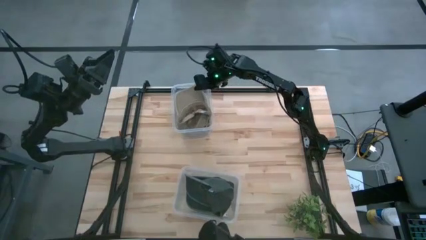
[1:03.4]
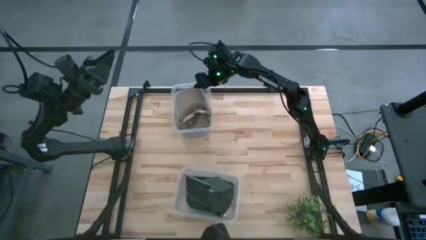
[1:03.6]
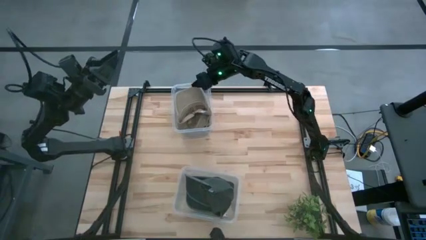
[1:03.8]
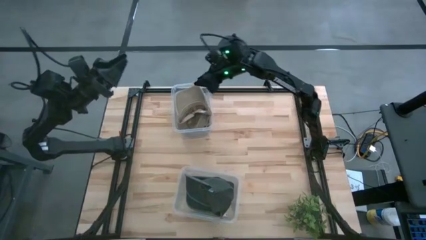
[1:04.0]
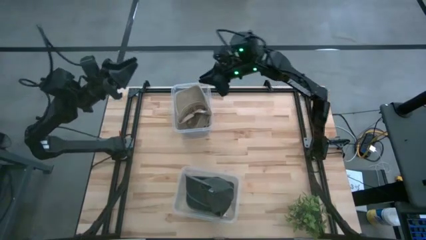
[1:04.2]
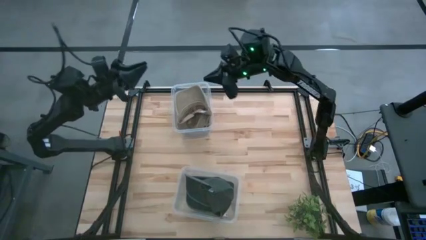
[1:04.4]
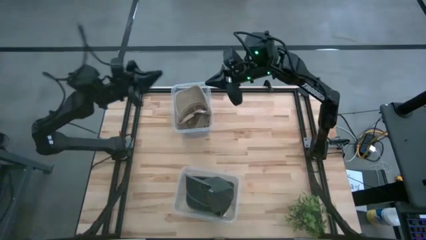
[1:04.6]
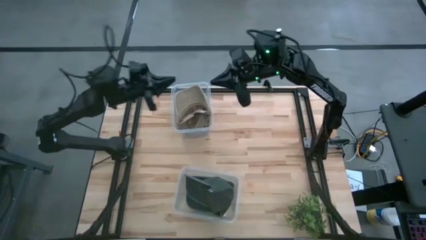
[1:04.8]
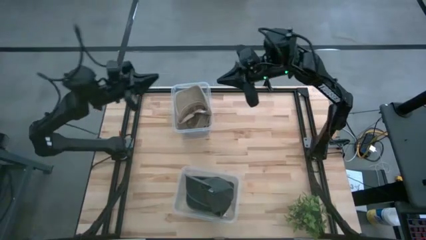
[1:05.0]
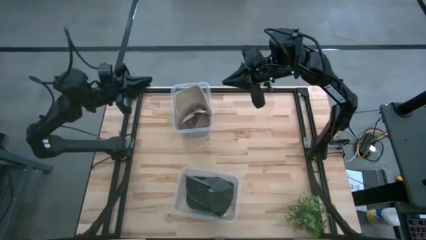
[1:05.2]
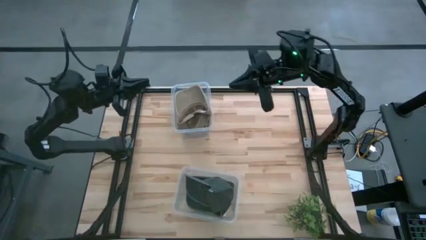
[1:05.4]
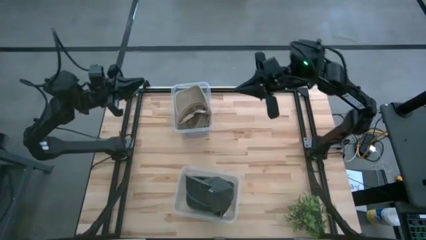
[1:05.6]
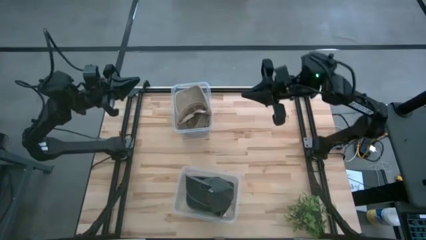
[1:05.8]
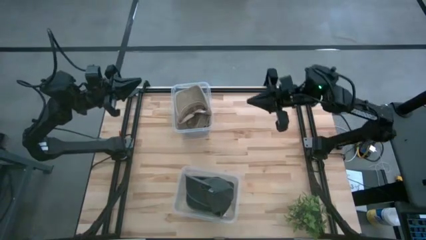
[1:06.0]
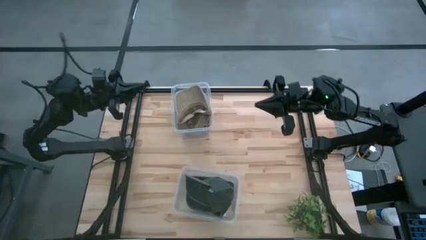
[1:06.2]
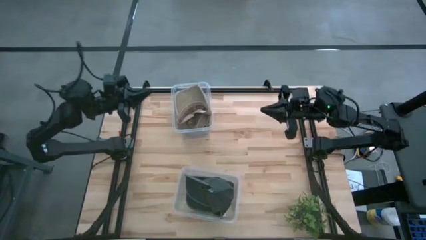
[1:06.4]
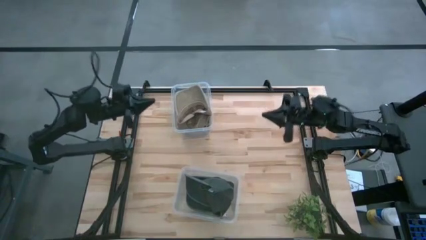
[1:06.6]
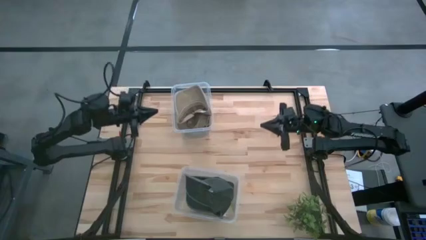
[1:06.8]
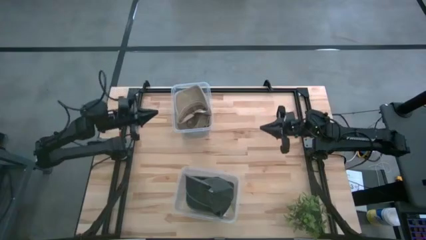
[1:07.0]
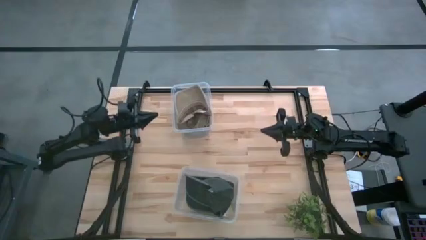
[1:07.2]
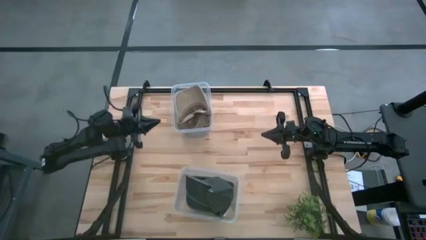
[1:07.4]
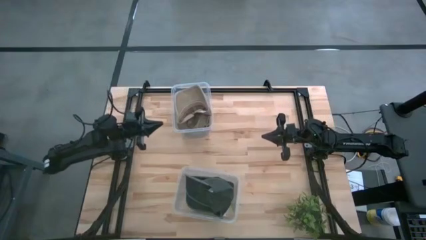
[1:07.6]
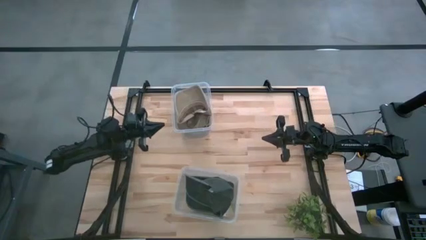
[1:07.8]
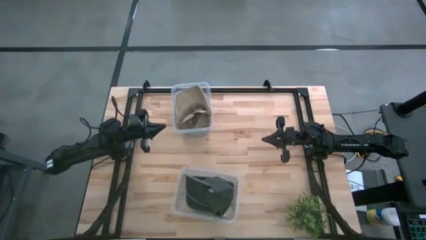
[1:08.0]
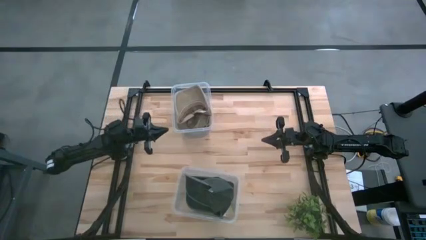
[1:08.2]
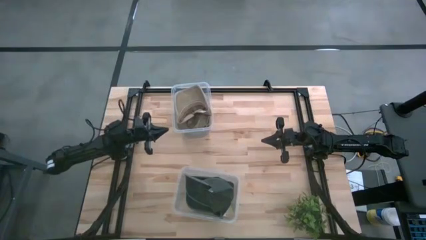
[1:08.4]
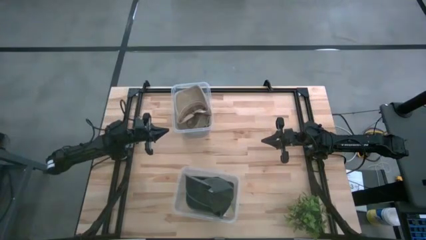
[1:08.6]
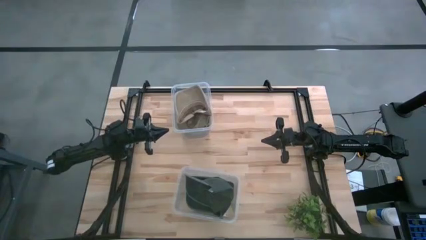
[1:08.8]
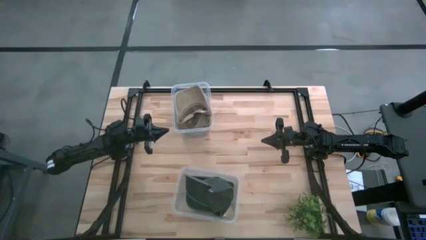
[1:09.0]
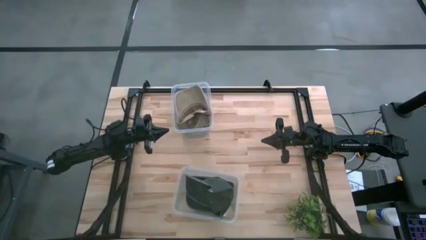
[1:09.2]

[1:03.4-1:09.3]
Task: Pick & Place hat
Return to Home Position

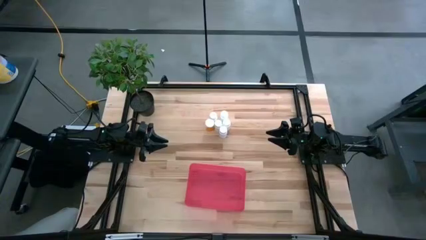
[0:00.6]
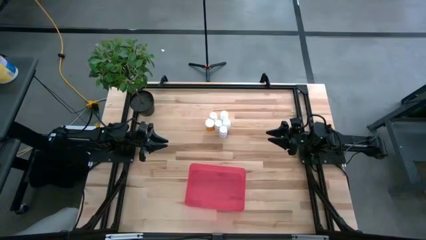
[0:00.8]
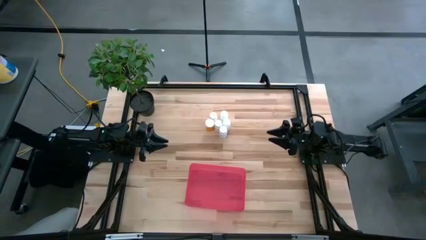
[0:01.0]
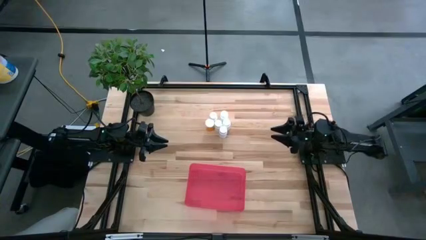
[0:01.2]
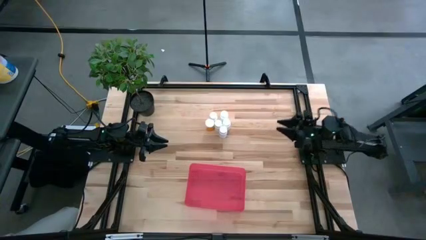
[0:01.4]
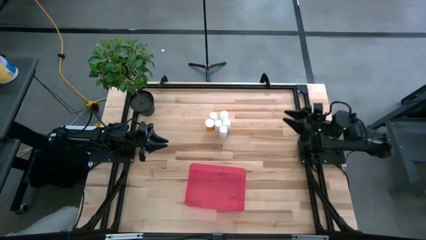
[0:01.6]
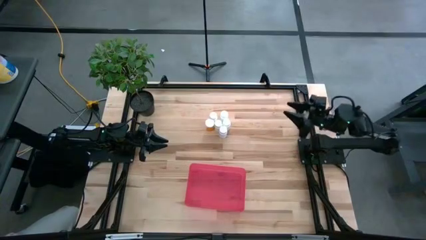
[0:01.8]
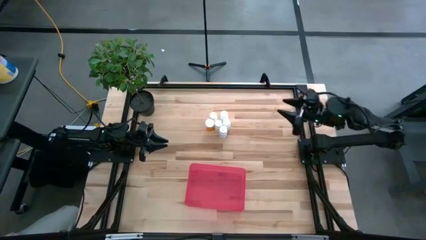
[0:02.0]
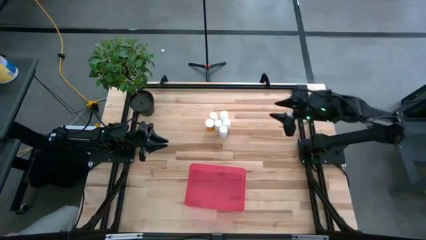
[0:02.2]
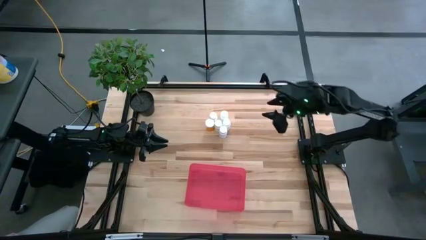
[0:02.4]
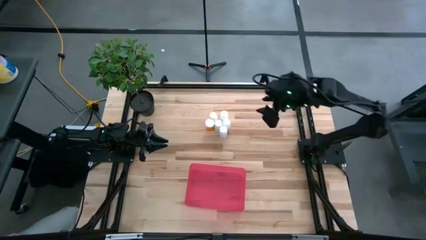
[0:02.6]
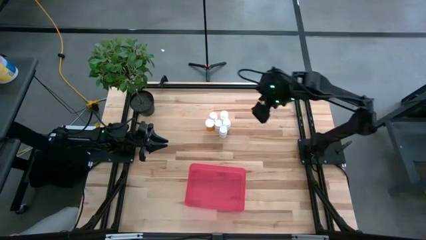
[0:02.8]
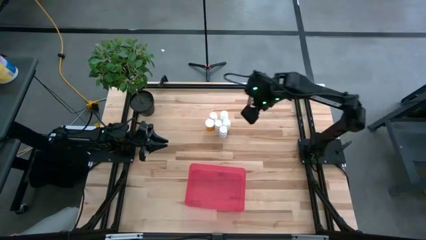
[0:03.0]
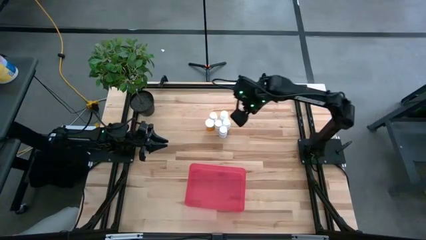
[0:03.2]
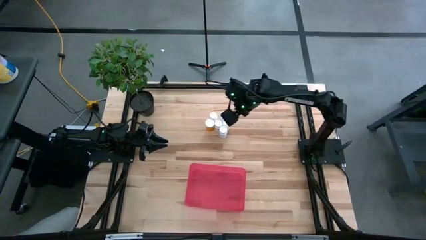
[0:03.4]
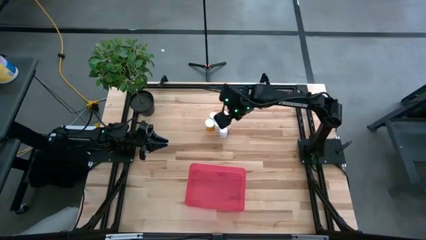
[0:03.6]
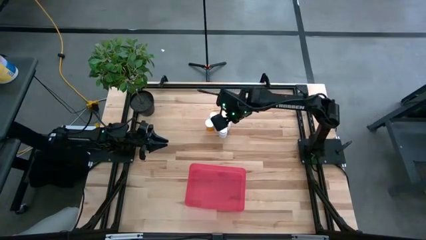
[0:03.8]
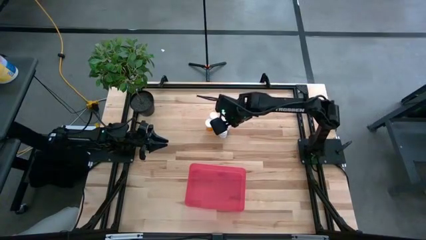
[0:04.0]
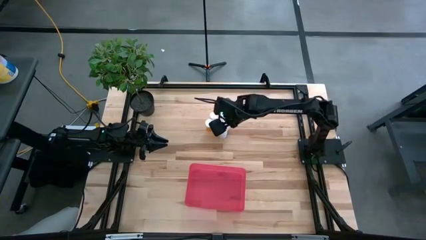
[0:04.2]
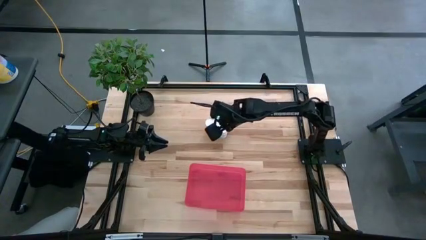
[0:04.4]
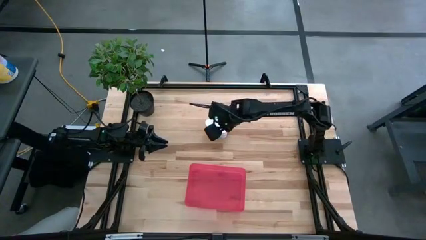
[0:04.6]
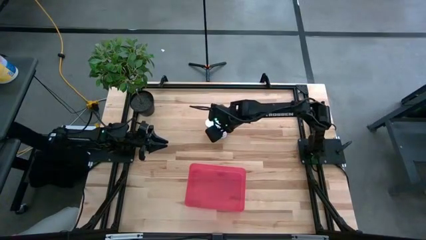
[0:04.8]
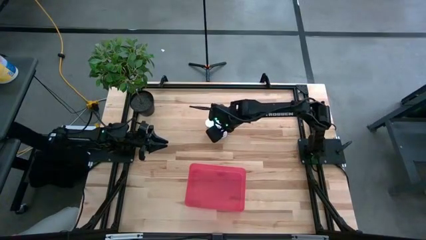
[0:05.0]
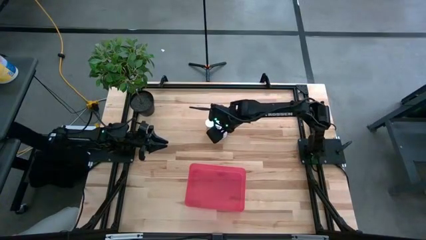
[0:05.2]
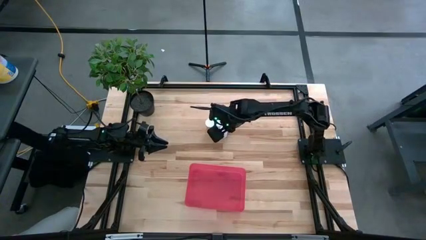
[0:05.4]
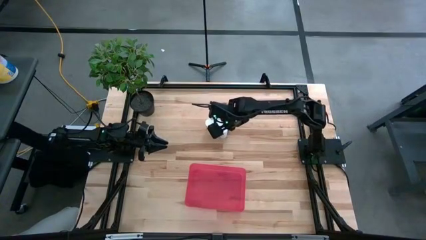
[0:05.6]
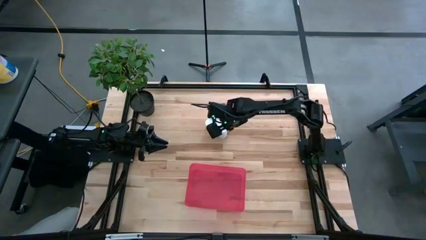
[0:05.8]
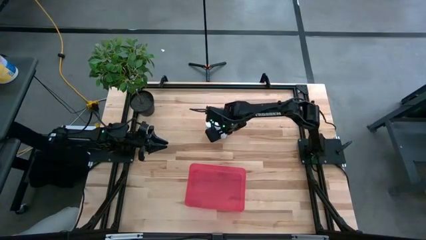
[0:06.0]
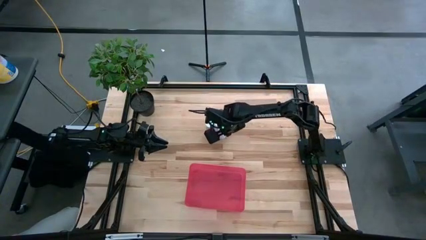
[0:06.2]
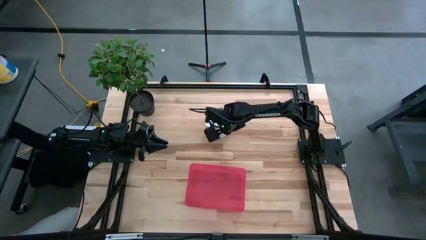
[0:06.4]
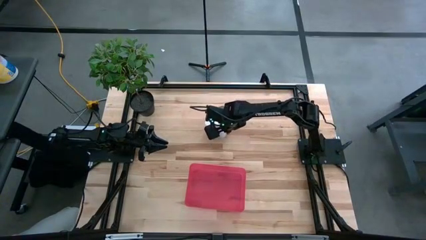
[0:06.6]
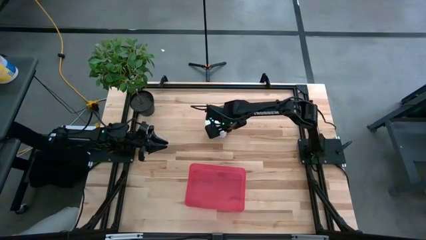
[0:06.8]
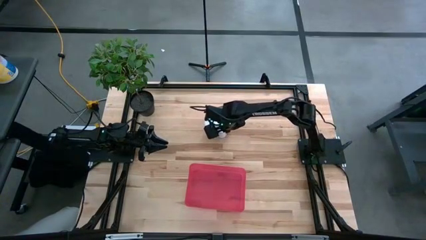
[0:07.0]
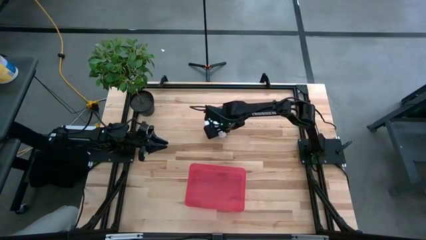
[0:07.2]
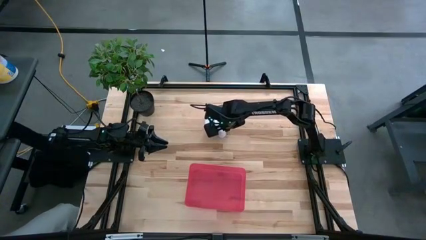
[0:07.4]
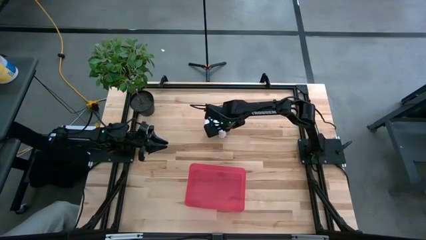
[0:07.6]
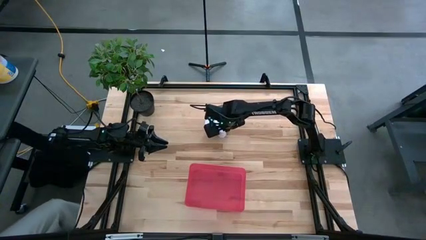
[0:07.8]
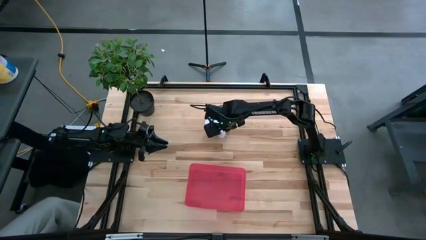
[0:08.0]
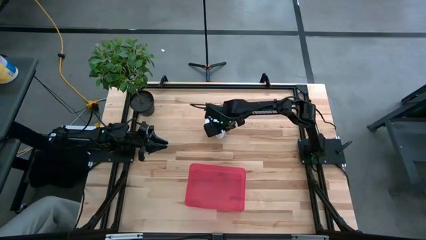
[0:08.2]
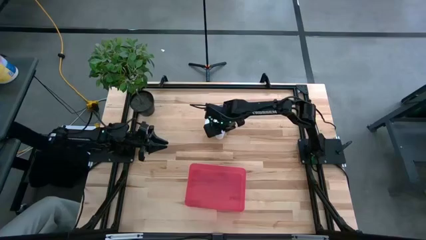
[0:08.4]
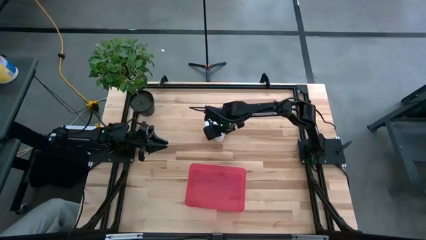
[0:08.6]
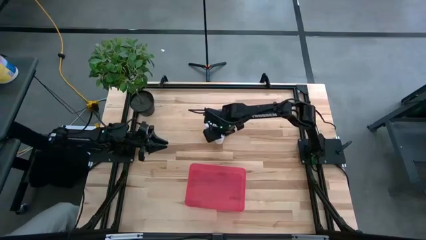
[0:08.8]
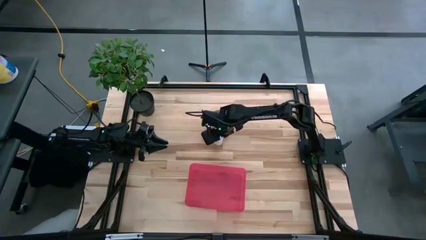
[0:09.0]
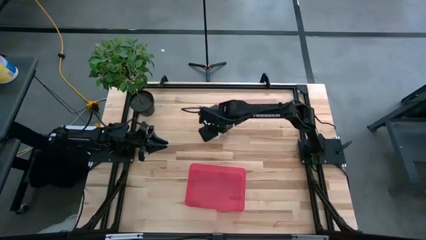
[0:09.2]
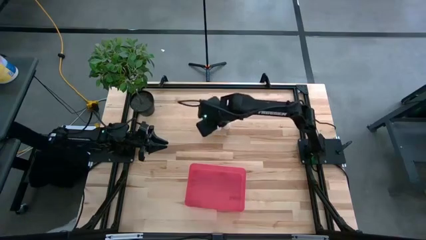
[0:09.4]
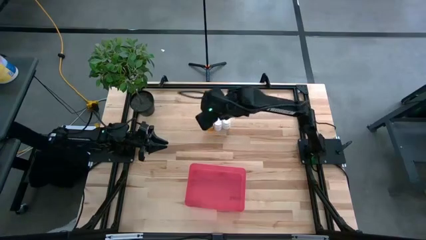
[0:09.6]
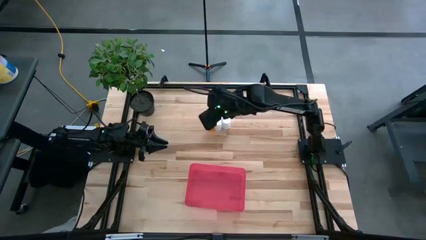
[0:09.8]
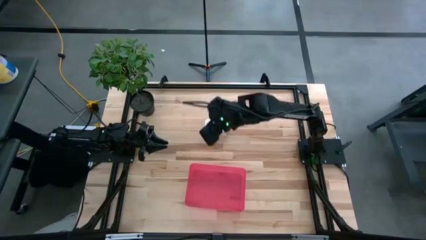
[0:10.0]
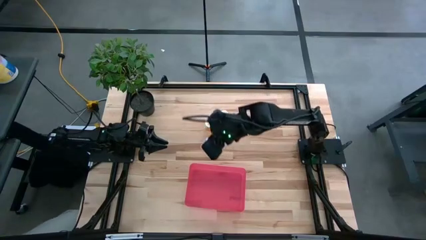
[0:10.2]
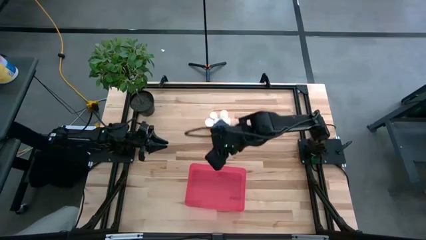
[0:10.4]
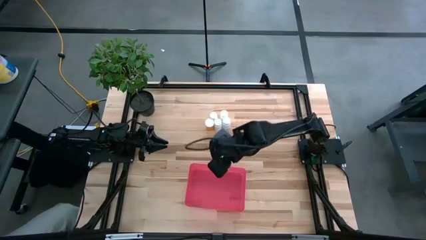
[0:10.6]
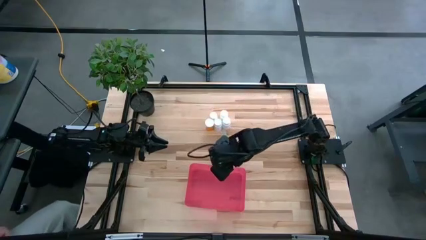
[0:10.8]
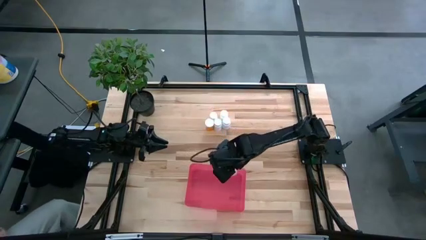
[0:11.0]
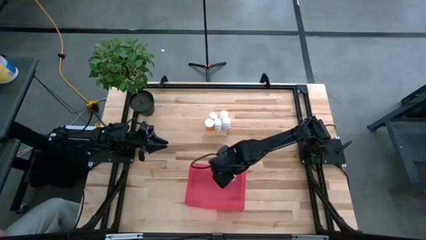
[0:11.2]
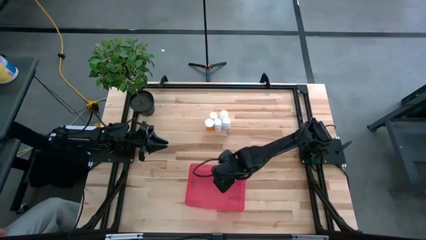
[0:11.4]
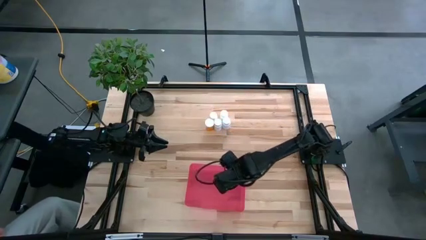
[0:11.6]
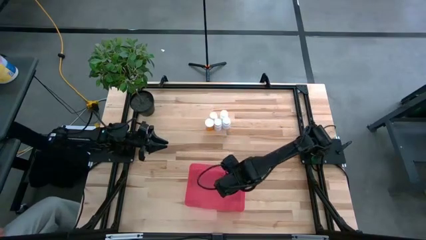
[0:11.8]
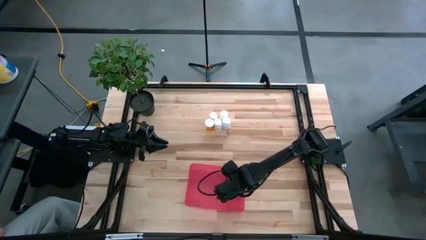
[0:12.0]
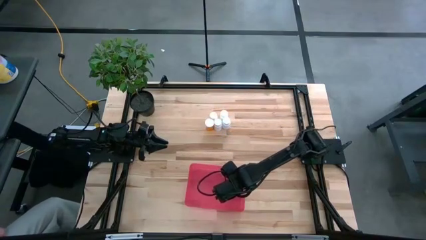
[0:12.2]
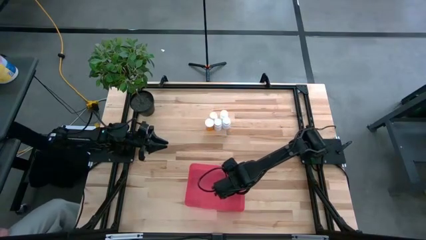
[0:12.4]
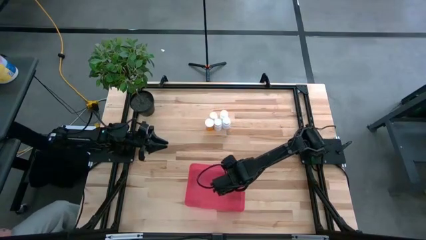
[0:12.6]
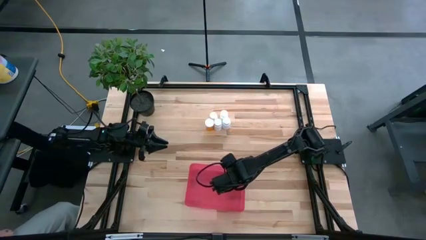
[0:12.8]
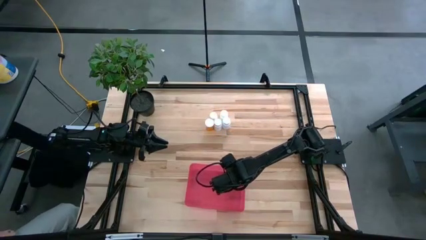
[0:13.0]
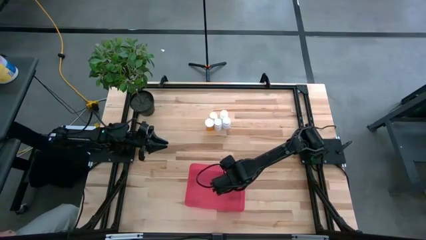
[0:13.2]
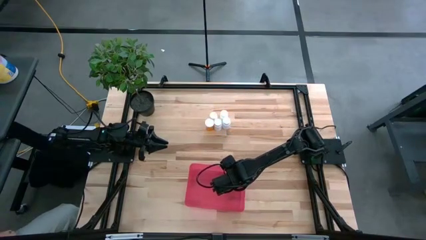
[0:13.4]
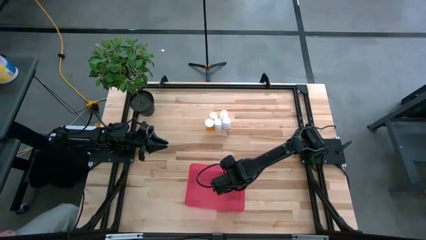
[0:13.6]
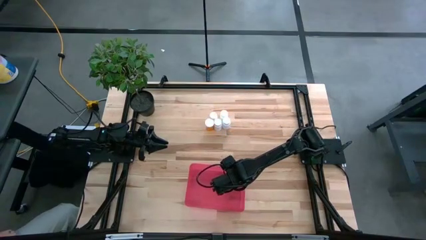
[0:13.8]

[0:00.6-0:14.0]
Task: Pick and place pill bottles into a basket
Put the white pill bottle into the red bin
